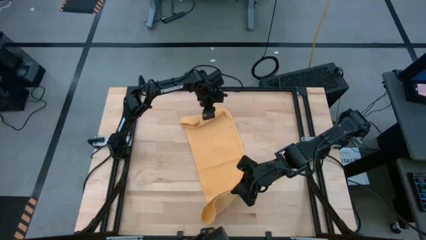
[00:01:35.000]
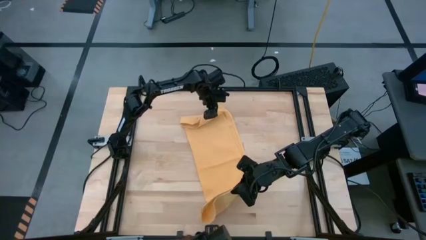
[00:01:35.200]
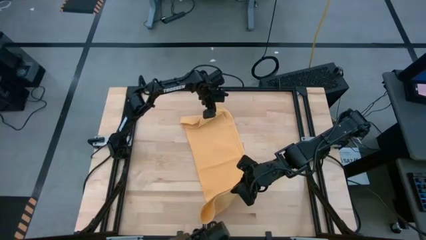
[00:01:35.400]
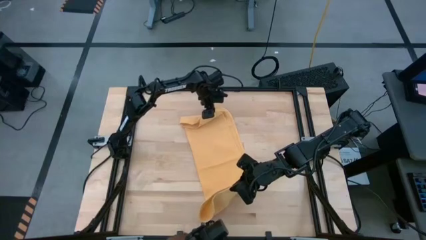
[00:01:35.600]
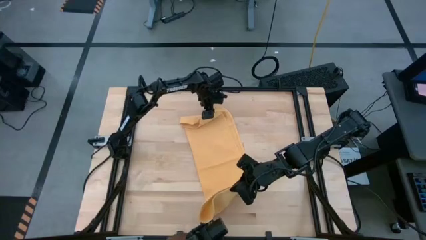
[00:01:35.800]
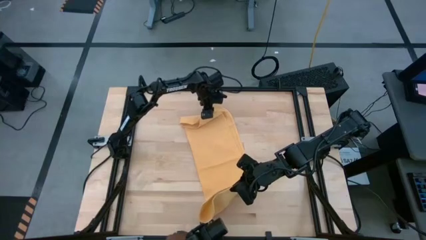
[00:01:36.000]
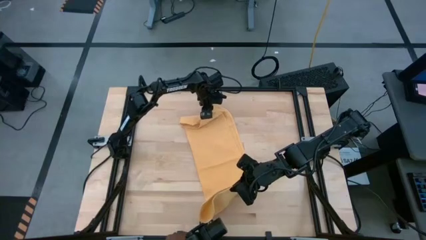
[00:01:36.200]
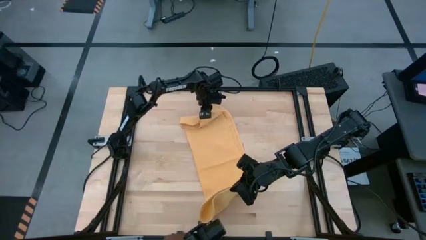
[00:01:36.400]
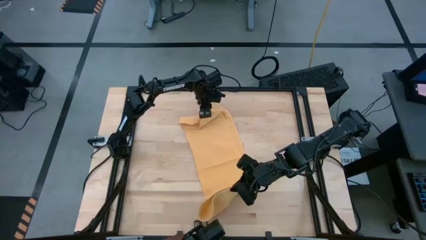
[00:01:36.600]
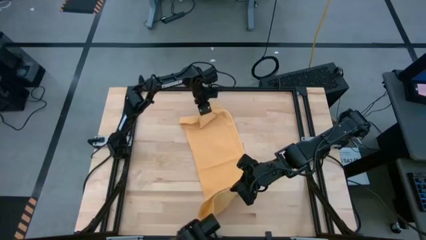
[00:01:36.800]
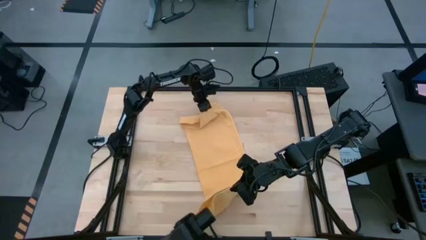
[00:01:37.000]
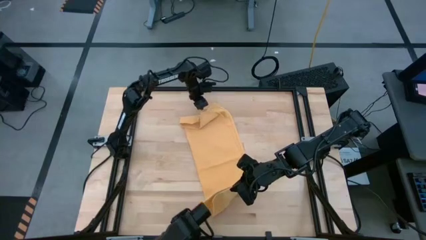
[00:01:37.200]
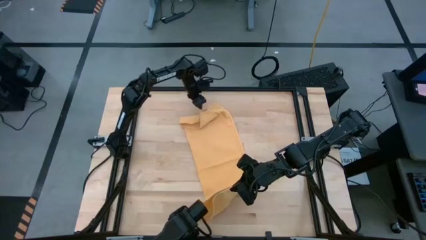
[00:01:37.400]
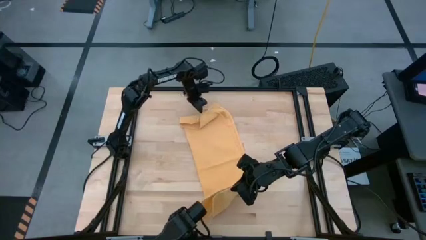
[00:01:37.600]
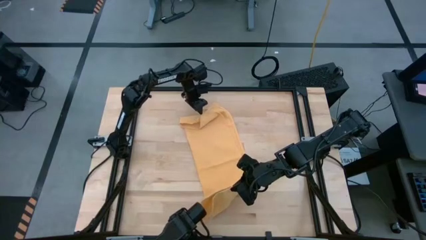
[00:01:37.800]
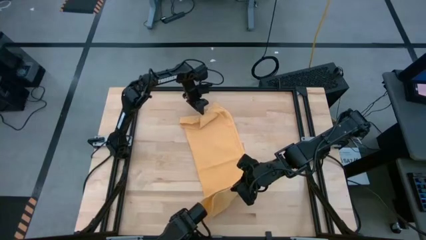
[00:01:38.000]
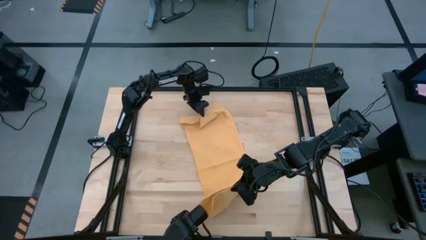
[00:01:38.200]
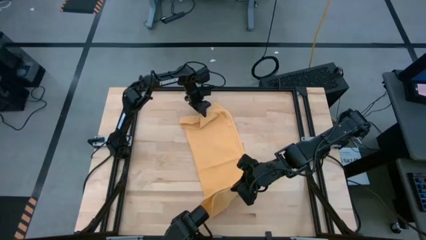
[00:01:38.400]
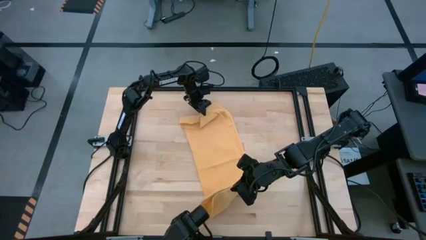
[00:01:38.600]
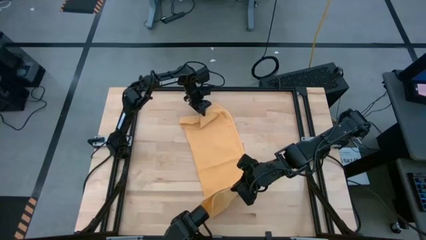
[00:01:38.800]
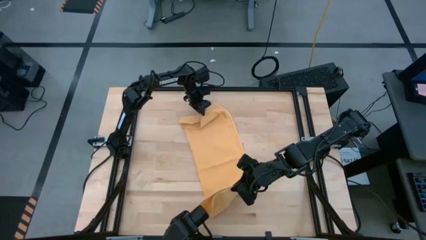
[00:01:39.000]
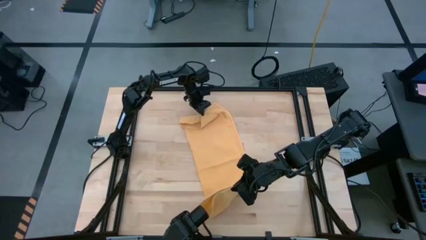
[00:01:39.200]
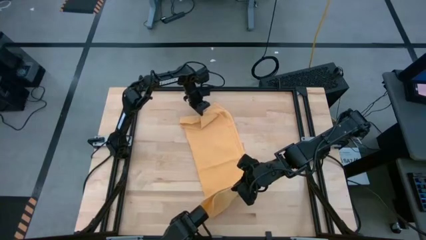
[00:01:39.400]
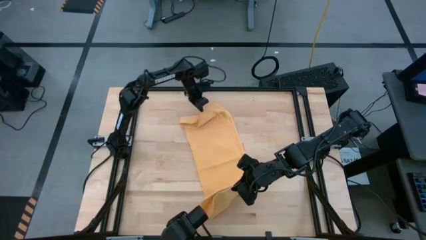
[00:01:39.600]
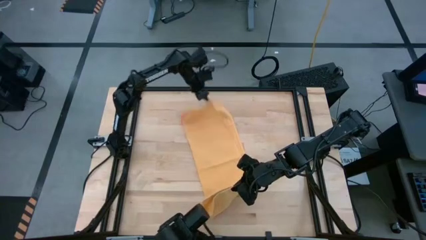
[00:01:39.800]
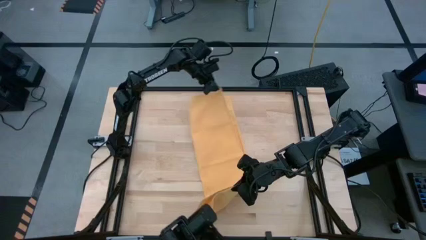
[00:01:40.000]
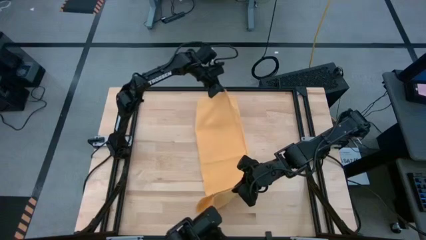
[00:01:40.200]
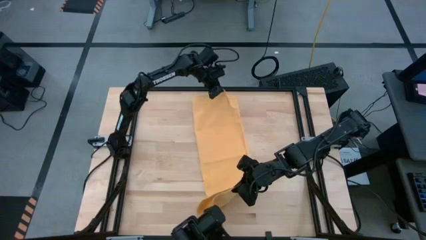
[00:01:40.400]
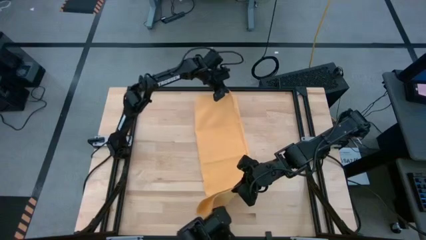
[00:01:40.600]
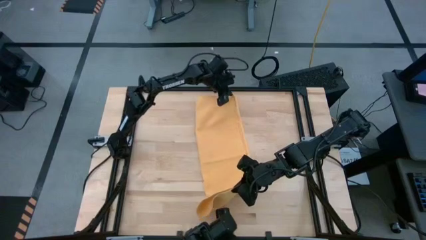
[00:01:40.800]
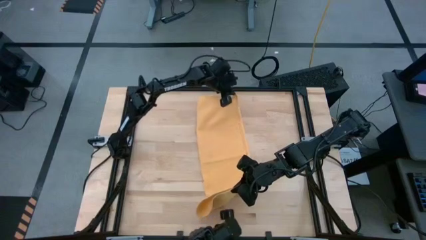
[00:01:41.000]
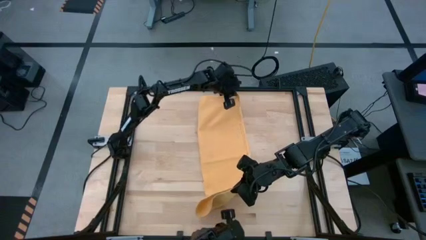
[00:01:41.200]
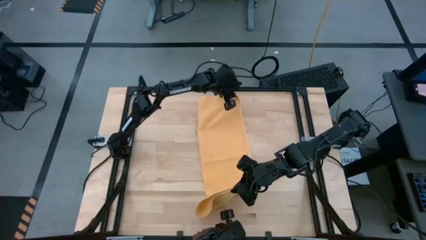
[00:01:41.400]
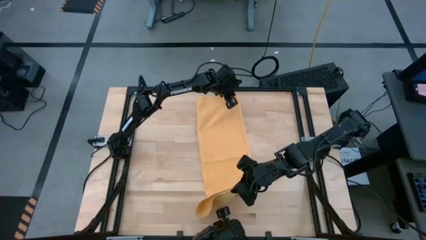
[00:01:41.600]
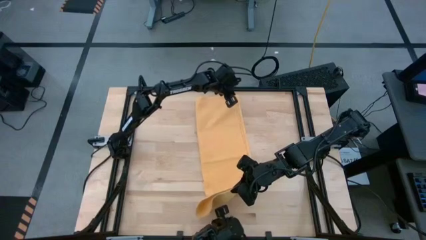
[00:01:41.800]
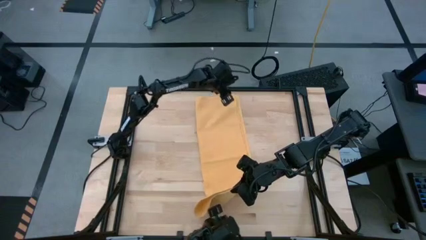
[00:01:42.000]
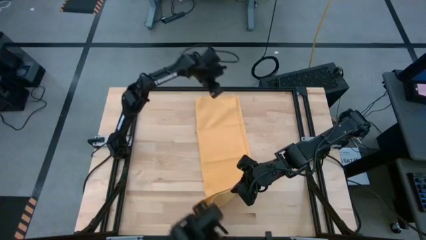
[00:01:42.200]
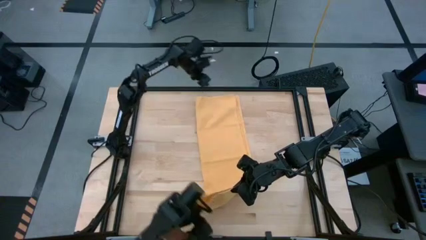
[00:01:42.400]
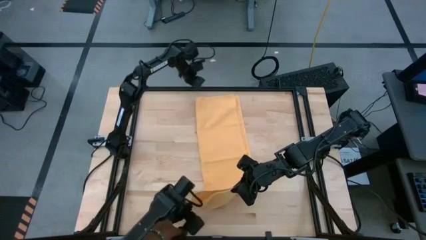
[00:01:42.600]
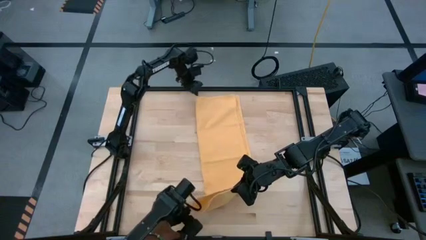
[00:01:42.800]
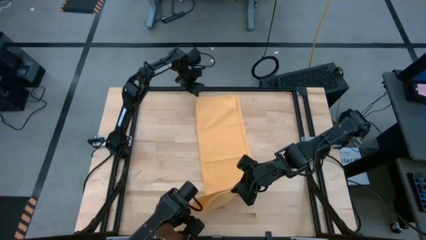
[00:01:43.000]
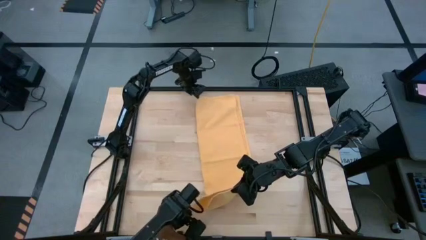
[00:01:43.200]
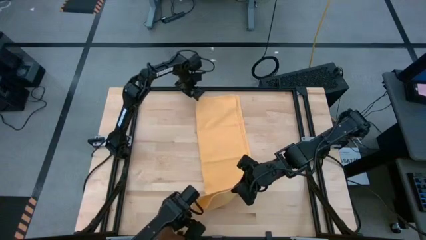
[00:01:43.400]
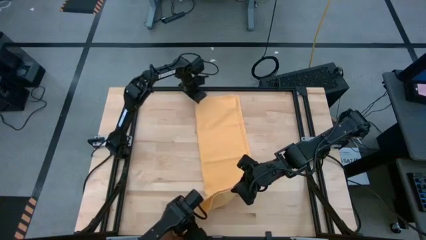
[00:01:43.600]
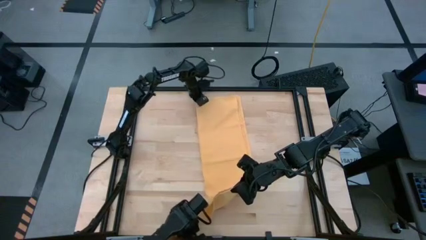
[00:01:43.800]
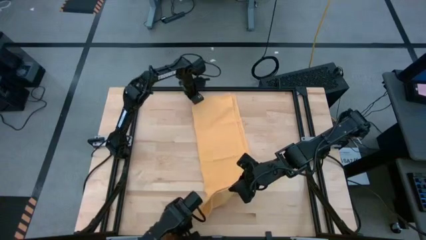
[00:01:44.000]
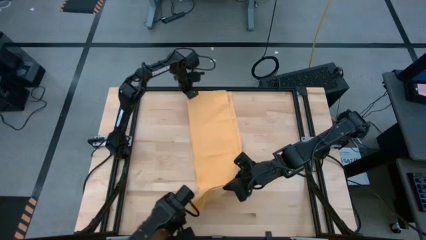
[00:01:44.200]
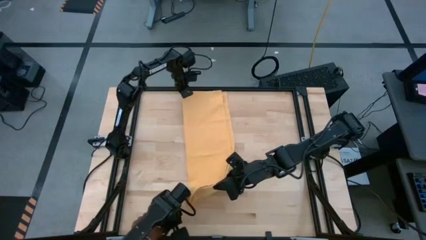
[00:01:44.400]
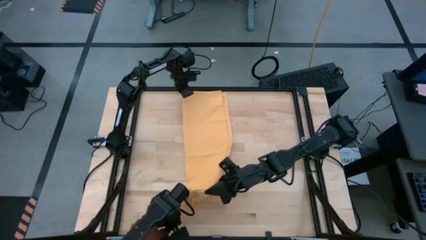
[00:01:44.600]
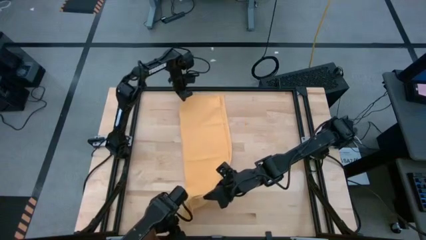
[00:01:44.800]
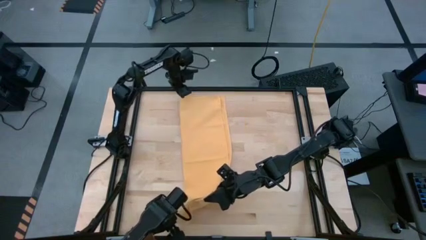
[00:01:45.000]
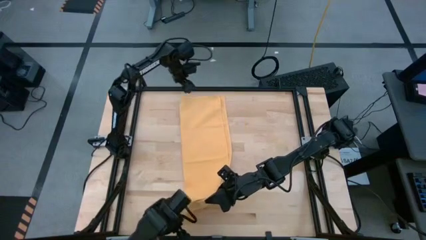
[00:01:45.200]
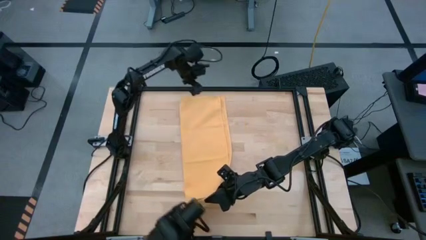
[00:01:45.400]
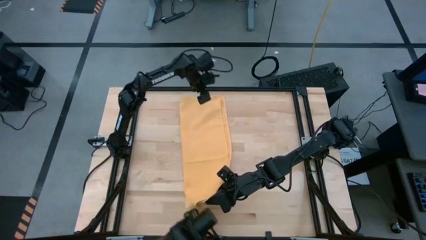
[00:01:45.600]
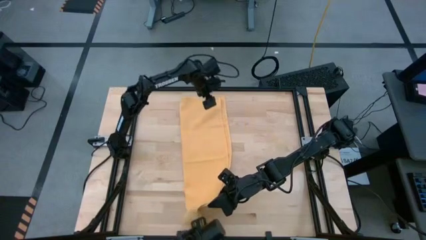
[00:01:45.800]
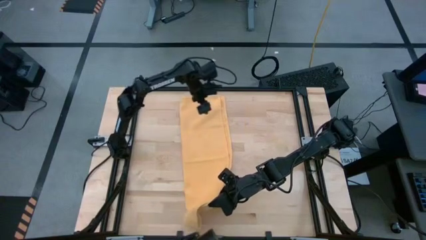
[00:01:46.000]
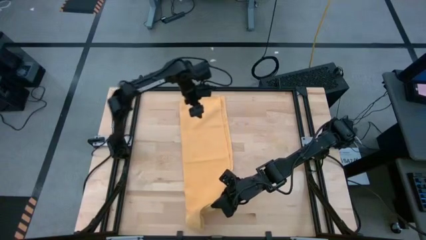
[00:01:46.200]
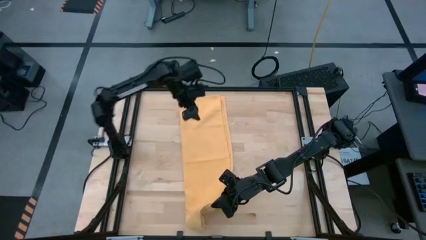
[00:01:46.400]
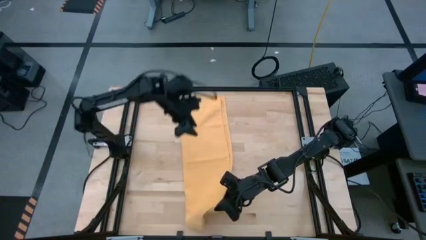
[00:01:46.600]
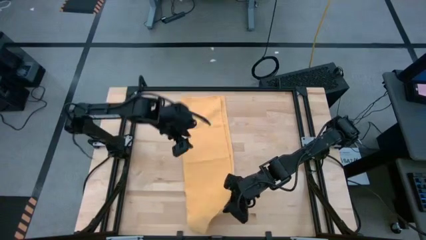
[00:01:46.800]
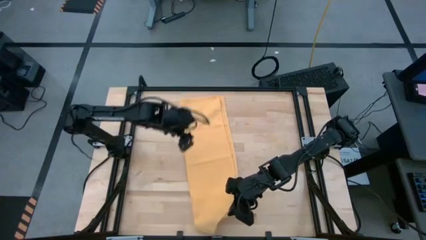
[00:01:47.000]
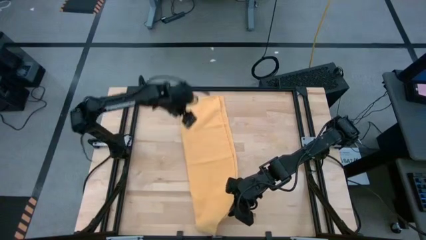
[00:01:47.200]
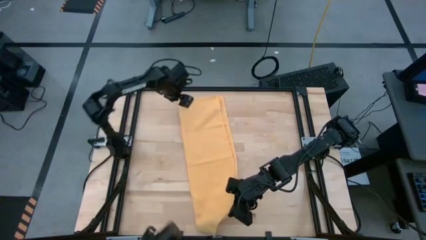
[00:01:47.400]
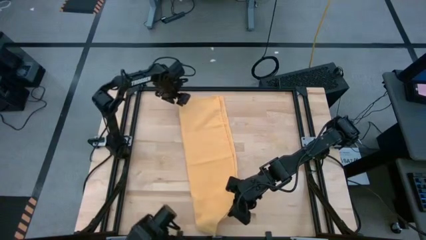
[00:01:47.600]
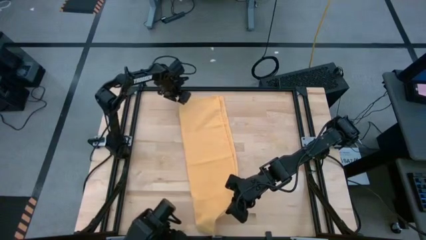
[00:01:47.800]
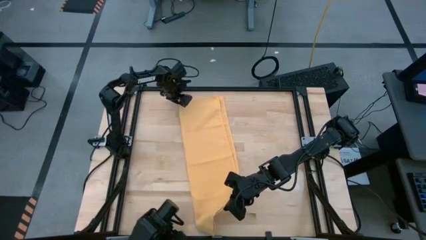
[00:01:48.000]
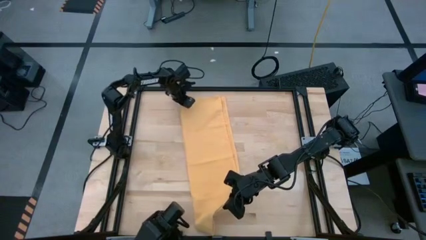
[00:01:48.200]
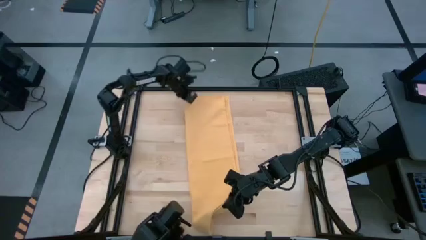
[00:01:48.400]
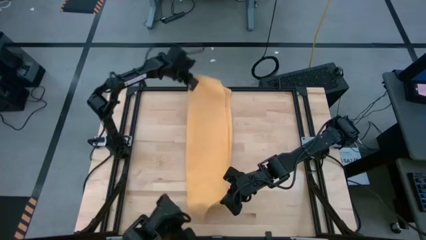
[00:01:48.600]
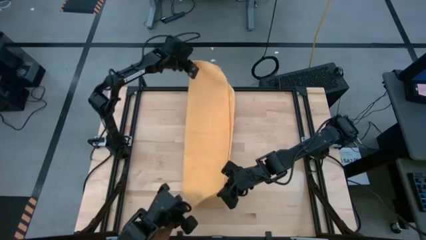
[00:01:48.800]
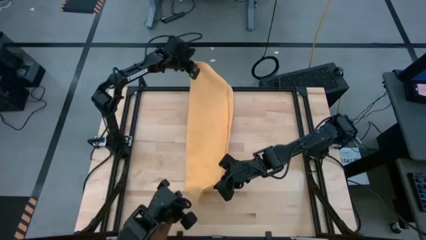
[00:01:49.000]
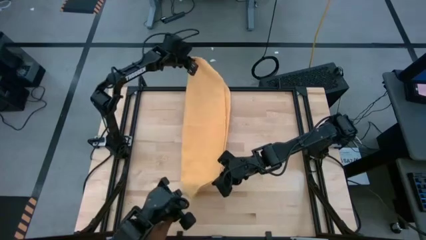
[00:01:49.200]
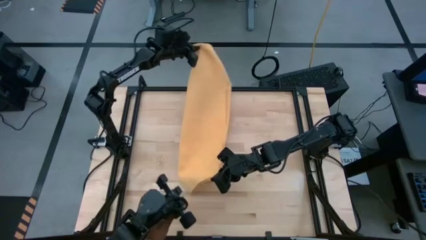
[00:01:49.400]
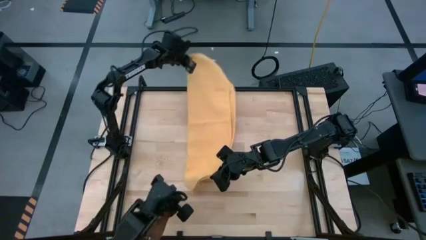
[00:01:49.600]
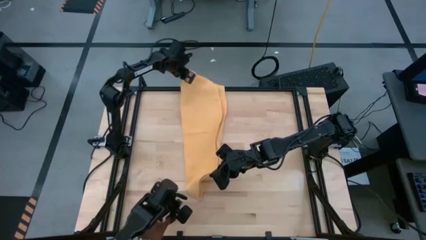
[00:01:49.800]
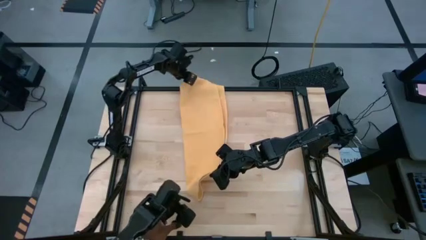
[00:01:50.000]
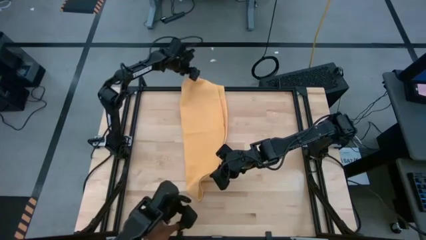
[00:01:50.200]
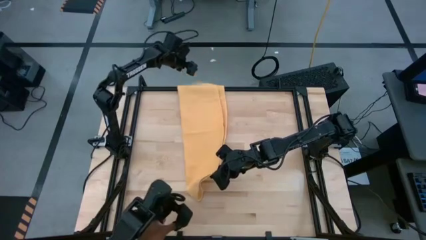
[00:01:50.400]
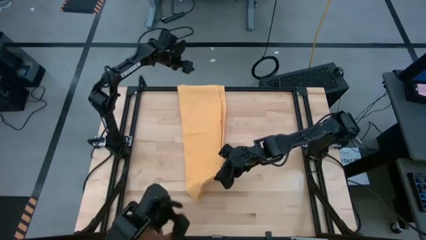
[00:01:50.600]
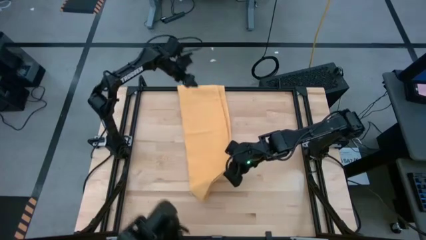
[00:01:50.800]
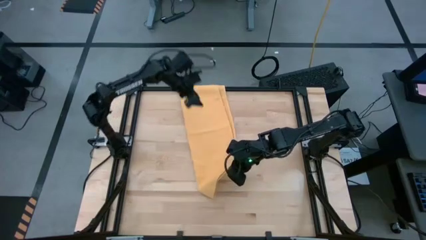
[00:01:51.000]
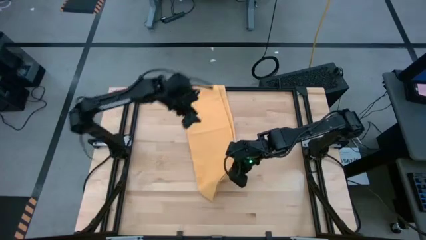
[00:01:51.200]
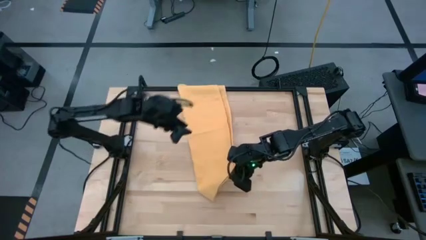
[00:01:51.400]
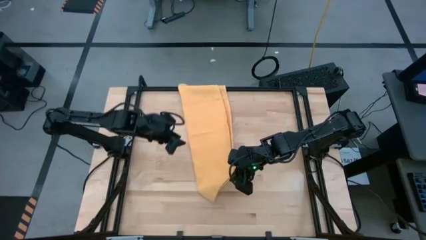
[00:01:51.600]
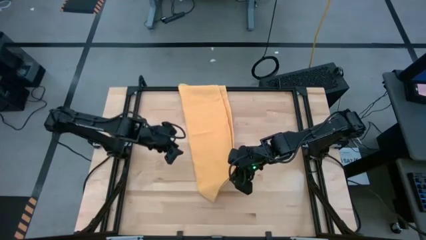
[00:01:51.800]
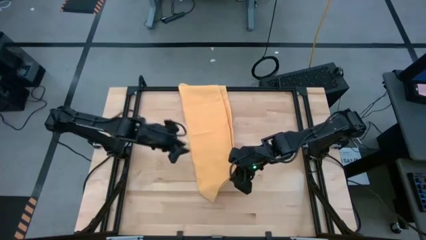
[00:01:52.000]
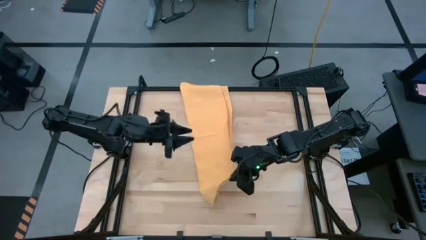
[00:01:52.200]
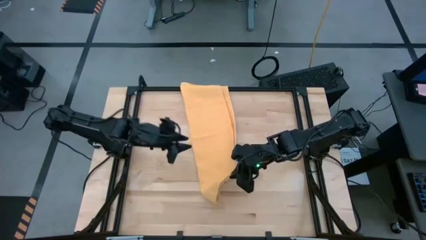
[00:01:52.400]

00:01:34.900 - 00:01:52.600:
Task: Roll towel
Roll the yellow towel
